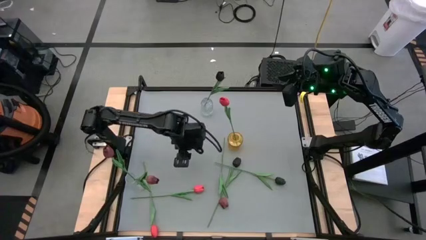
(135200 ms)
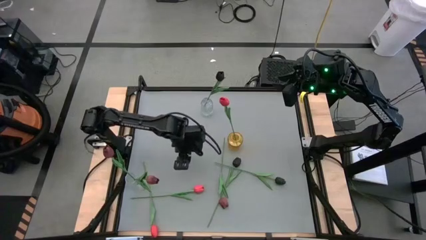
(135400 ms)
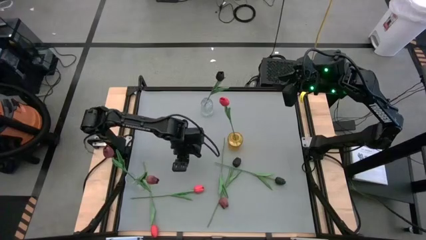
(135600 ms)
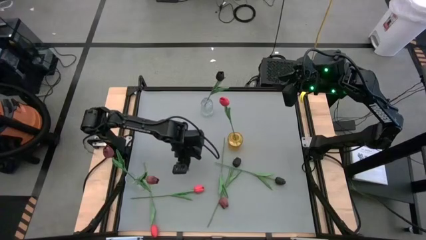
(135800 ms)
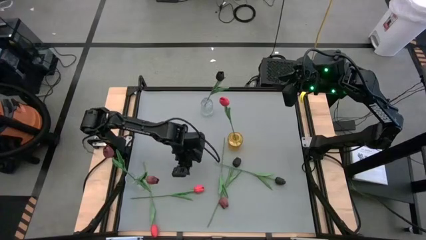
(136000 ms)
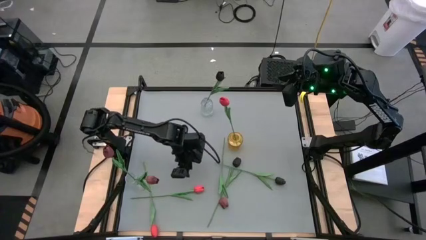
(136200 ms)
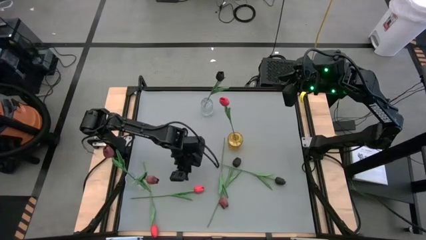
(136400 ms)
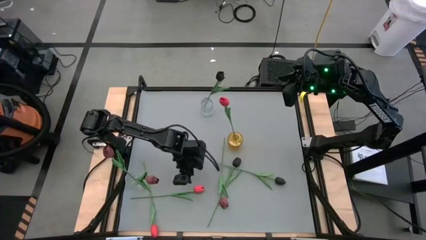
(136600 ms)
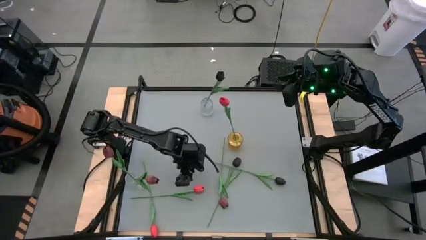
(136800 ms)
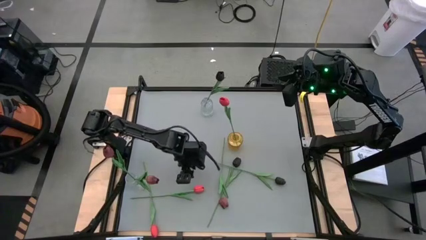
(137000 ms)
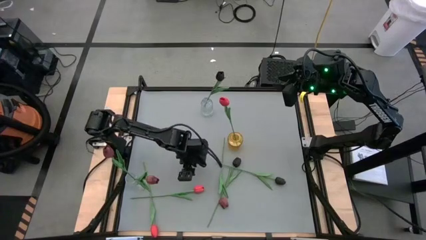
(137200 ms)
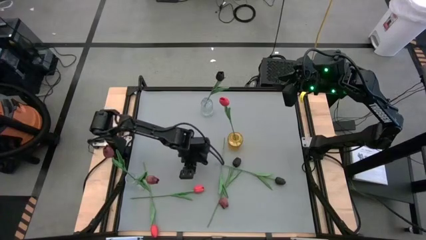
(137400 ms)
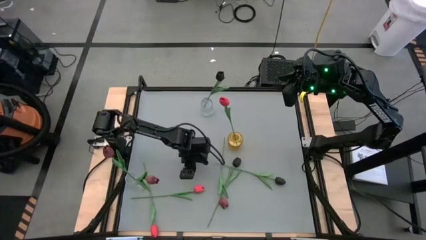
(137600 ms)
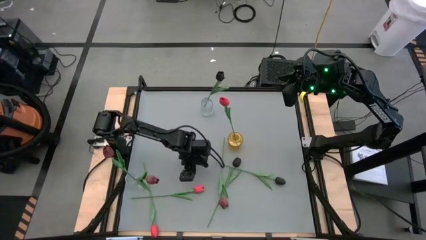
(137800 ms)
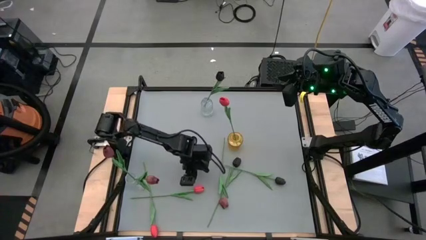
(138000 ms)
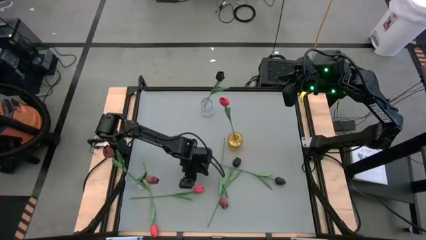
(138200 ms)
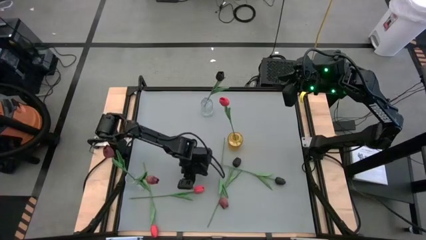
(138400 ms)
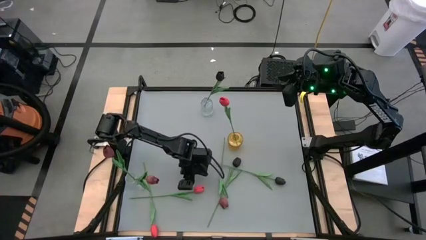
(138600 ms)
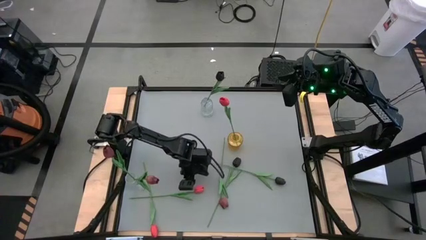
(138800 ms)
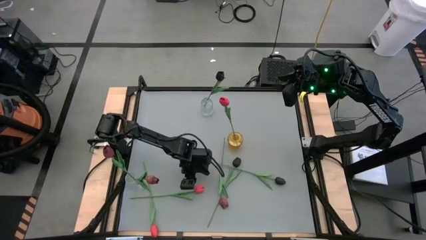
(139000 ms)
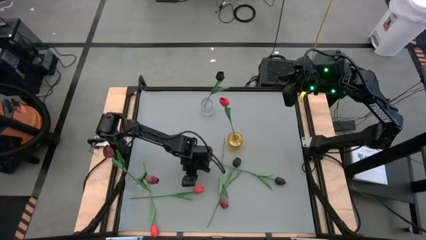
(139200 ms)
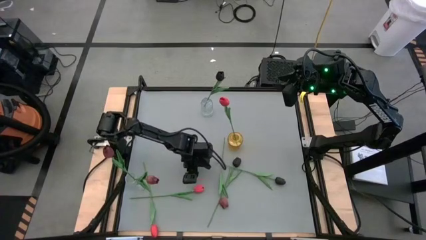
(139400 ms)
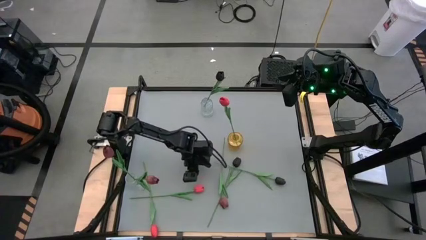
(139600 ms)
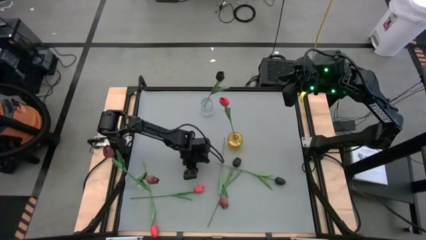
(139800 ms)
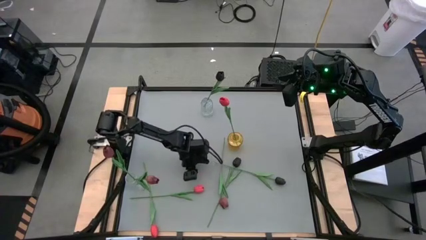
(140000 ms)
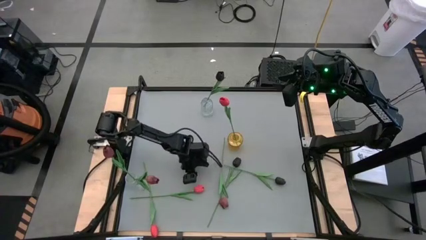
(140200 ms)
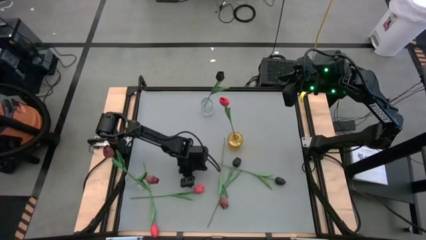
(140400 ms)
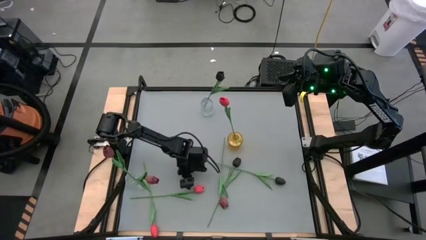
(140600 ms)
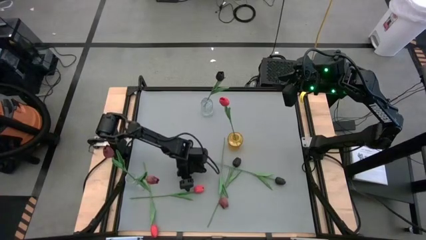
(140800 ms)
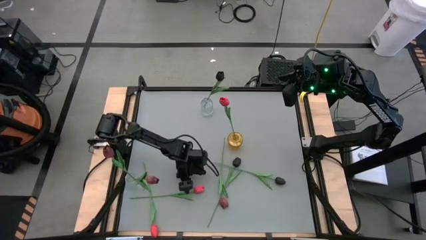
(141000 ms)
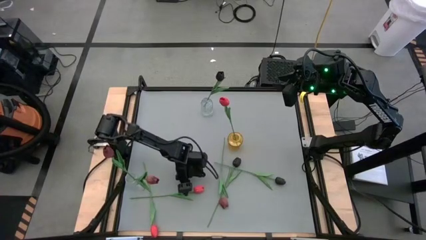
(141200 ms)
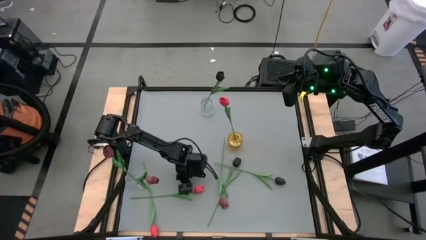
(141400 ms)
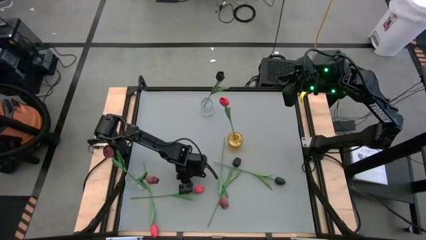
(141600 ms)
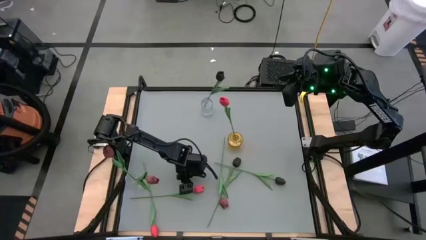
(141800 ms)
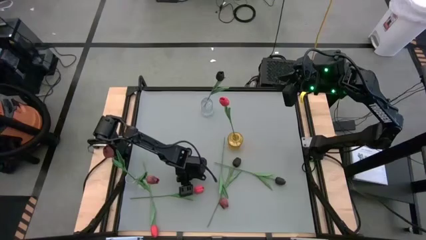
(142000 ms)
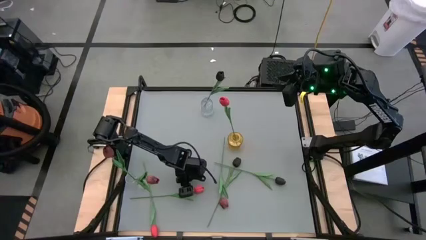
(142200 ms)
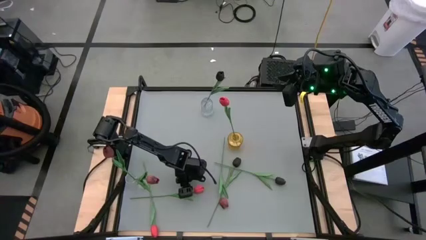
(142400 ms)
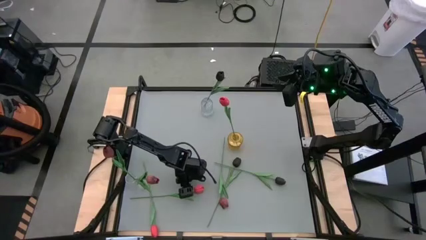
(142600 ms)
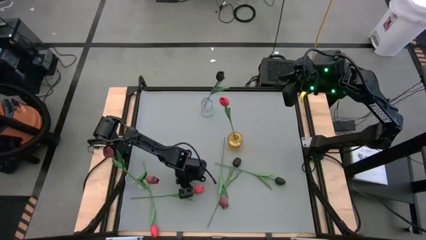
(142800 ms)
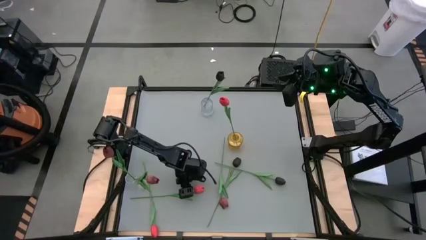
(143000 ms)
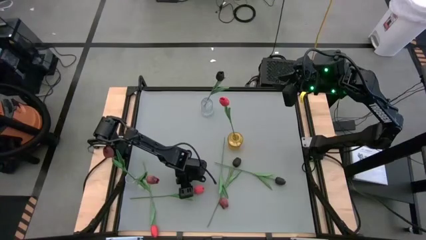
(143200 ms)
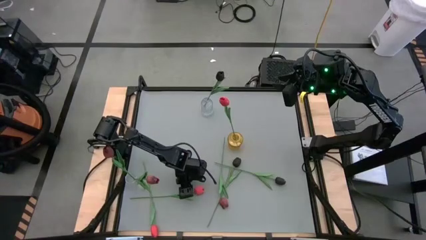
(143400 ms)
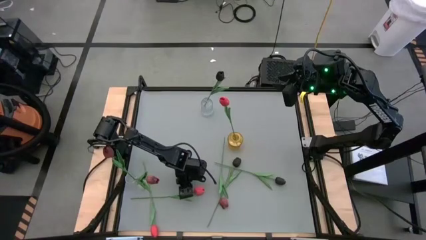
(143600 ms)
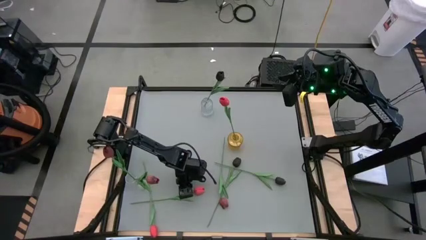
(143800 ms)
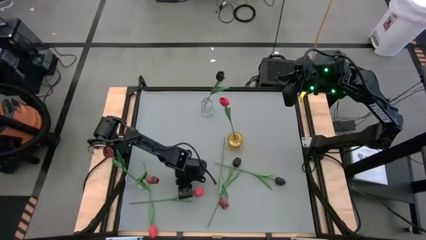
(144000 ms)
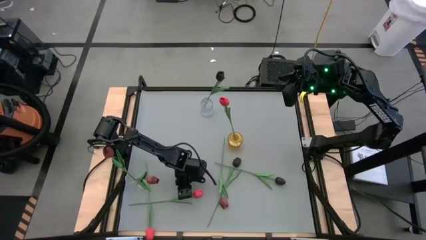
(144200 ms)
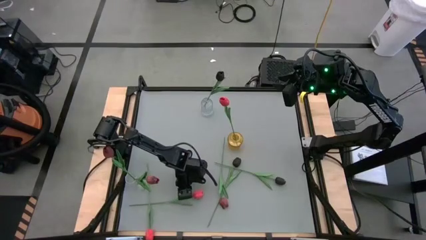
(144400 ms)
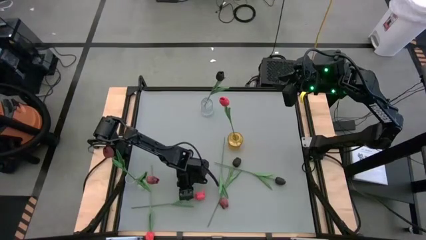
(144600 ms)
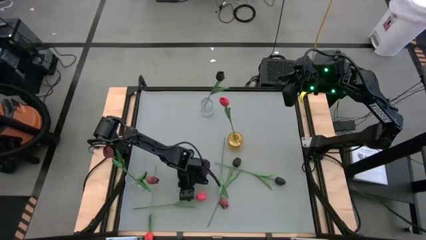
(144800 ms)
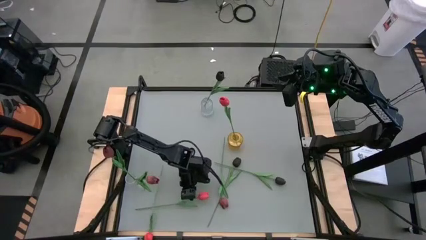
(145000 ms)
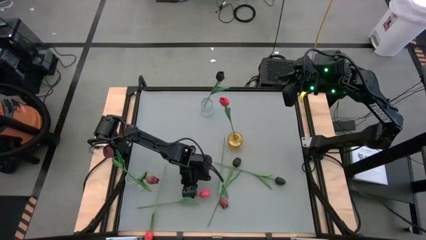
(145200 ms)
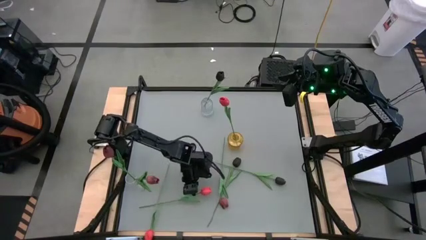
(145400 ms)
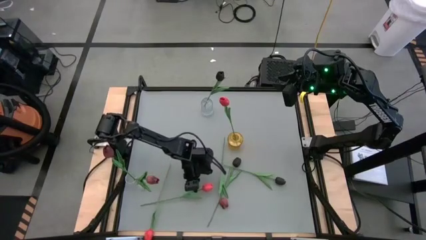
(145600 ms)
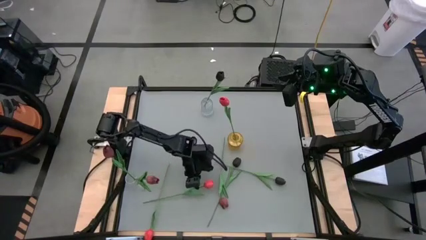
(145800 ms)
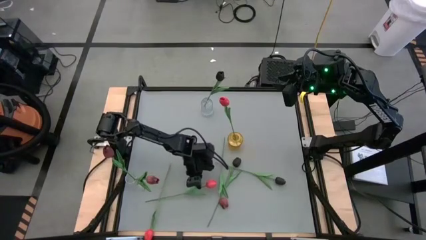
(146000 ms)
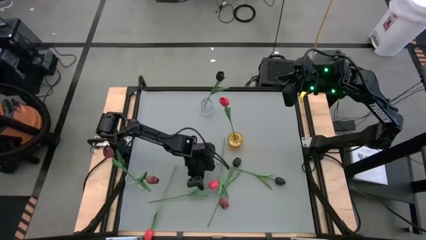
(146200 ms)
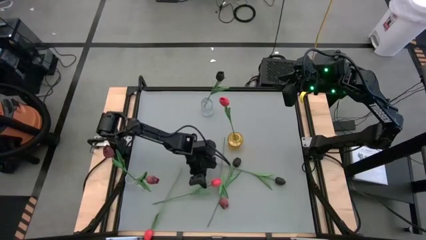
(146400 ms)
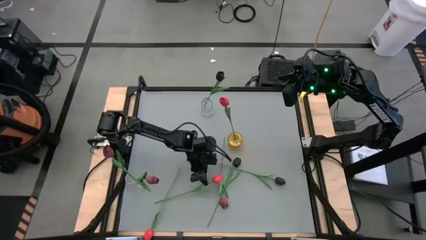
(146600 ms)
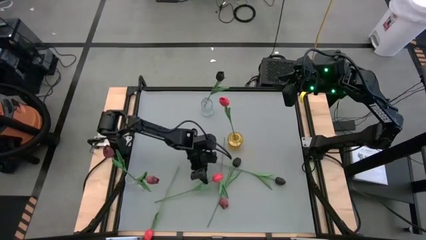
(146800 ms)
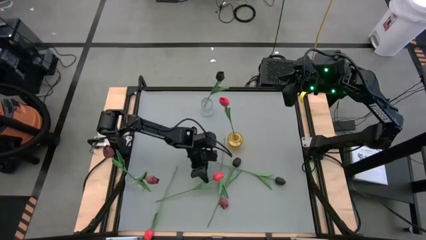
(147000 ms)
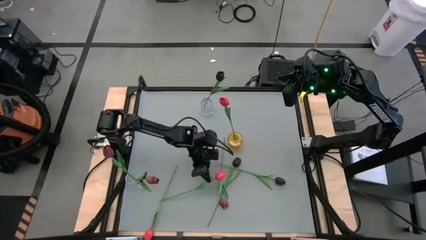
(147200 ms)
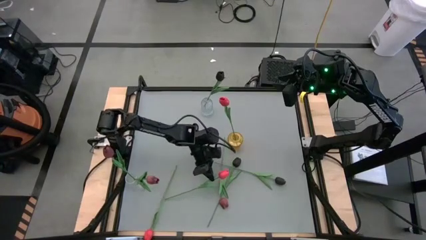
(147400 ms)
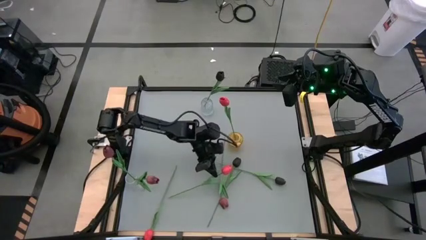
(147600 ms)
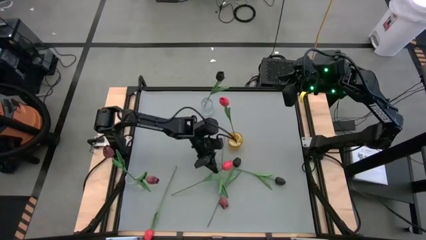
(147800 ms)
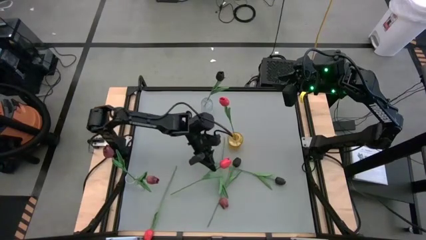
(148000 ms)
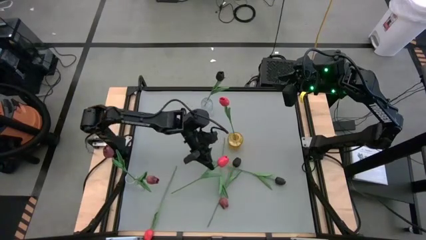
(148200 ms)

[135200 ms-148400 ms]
Task: Sort flowers into vase by color
Put the right pink tulip into the yellow vase

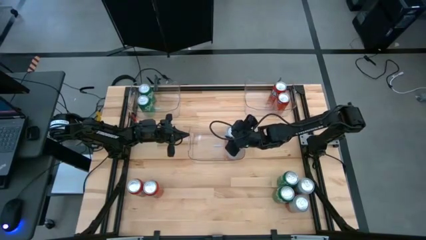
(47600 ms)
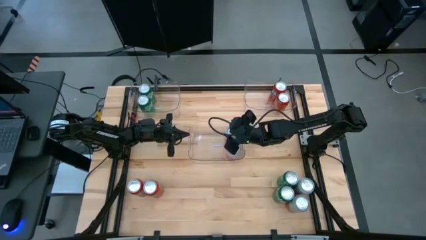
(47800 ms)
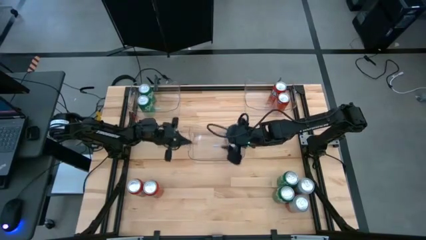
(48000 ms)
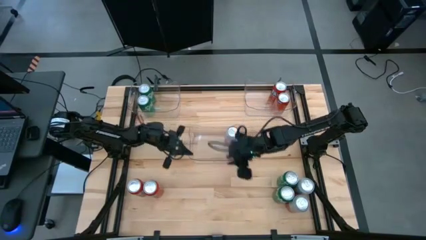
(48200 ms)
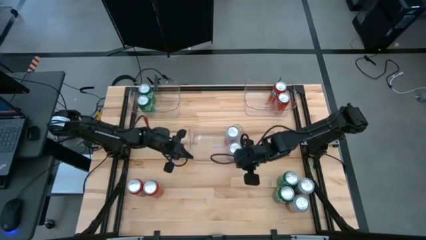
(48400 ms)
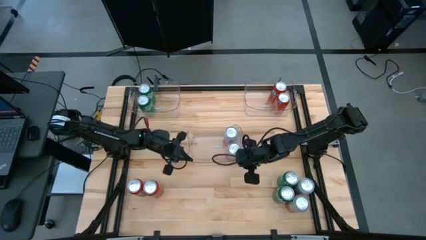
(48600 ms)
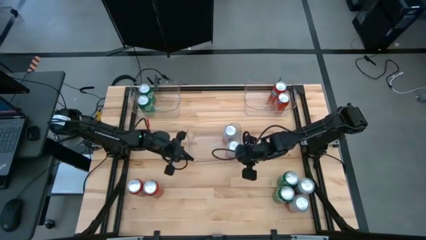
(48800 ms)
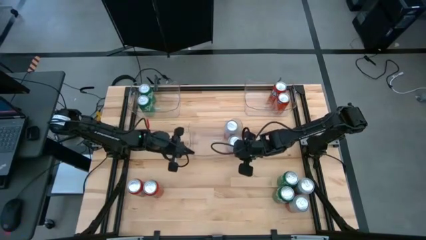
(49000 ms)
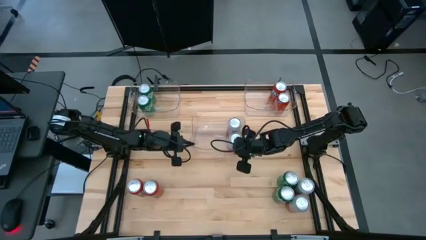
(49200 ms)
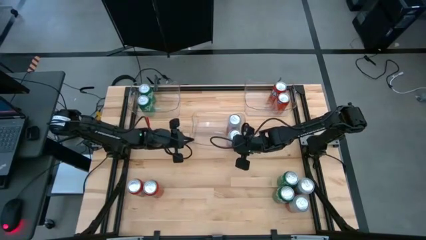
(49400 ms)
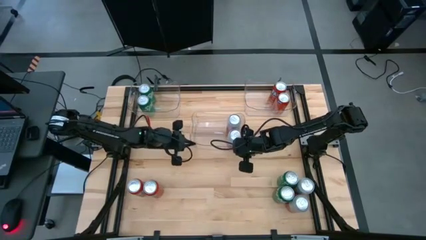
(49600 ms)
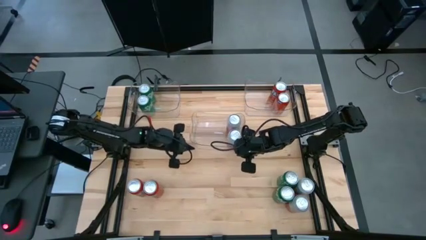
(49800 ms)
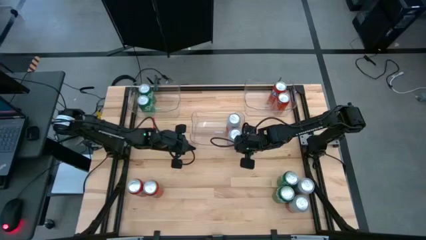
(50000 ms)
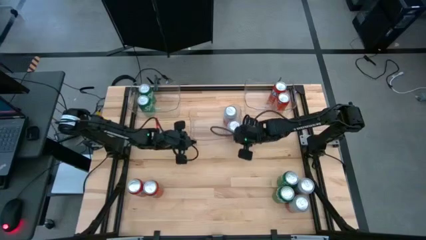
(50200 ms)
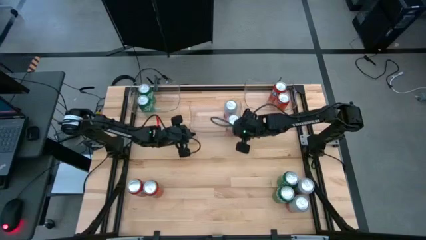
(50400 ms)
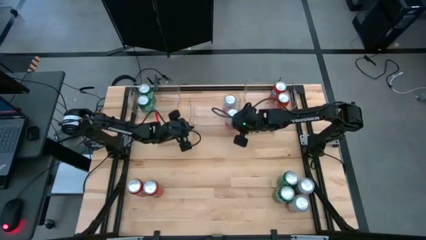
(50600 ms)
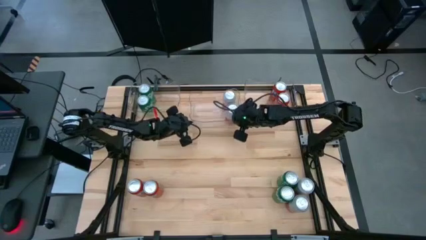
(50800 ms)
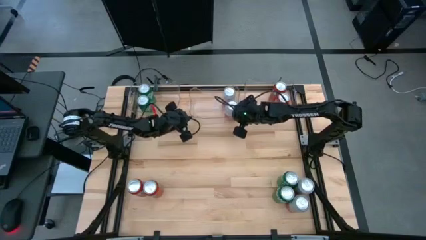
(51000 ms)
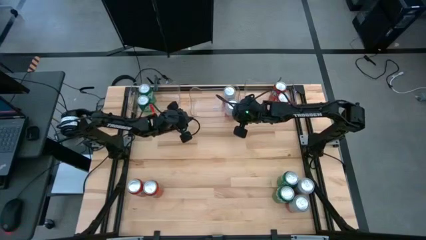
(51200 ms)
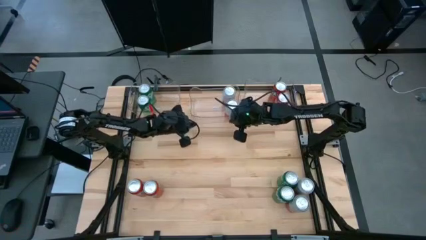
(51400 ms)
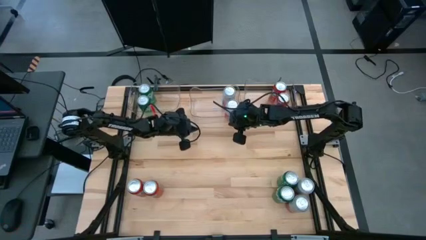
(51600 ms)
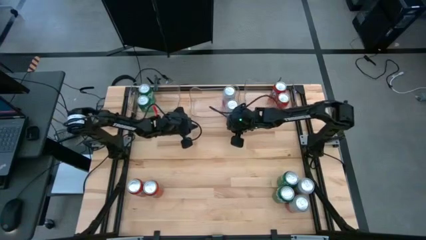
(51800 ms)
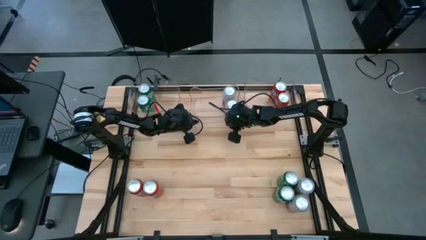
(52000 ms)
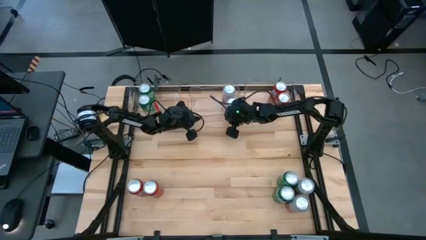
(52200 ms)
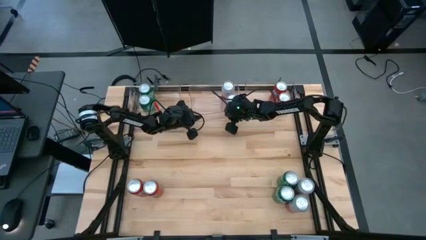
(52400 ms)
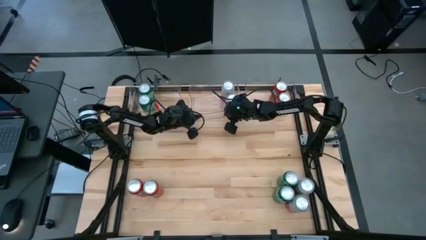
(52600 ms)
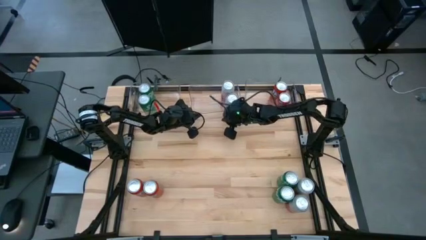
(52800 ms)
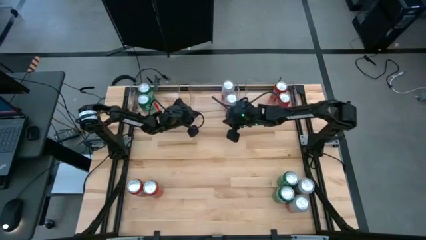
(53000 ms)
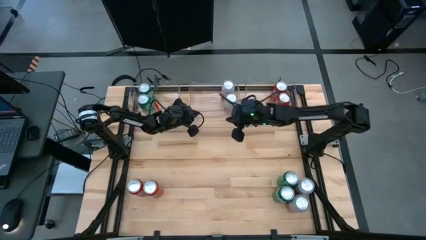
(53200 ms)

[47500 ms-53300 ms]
Task: Sort soda cans
Move the bottom transparent bin to the top center of the table
